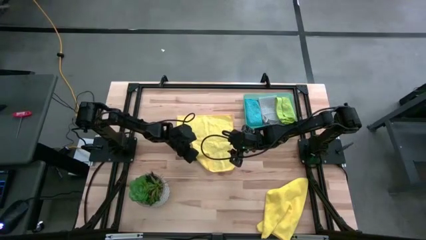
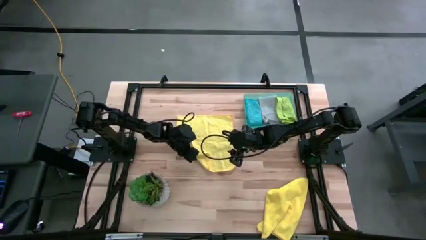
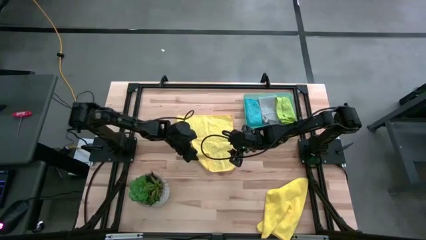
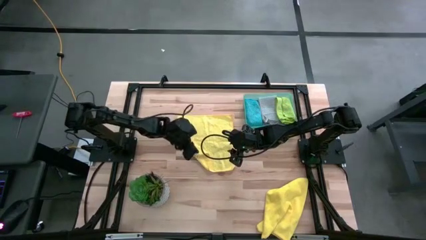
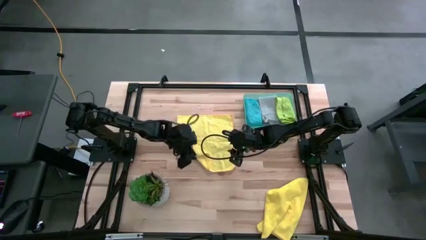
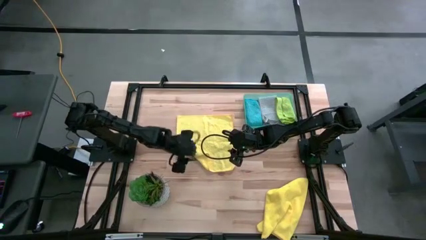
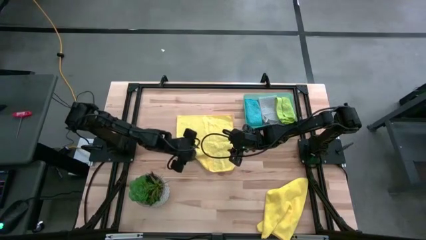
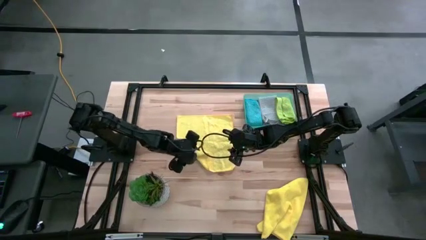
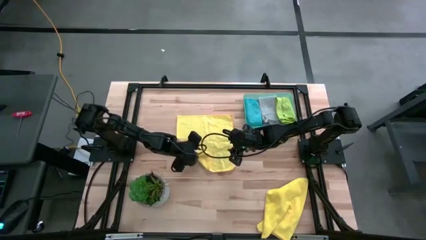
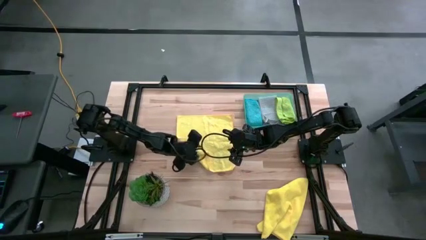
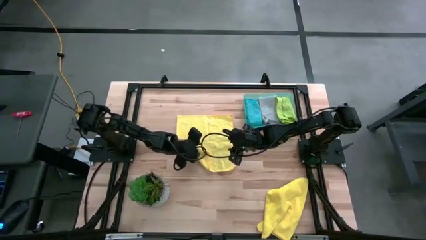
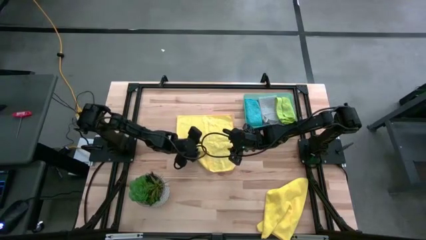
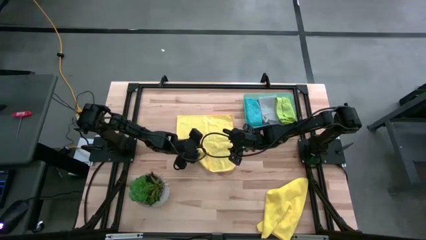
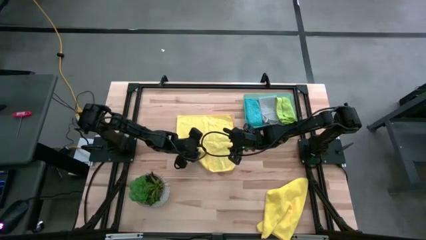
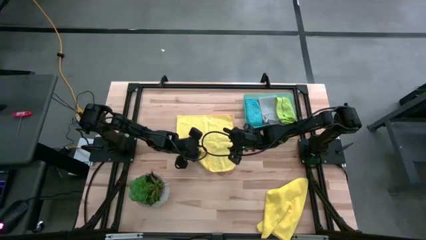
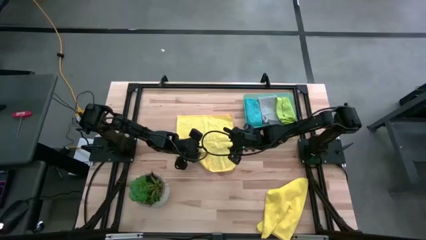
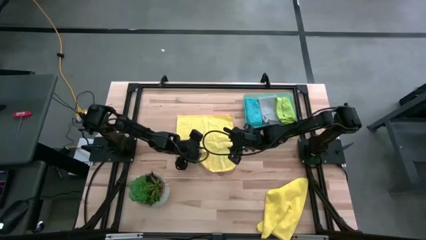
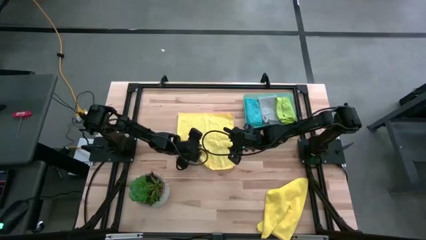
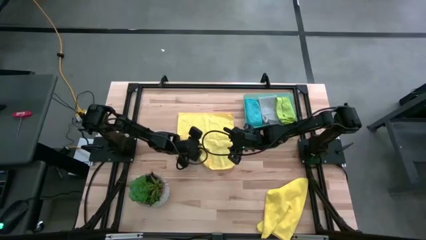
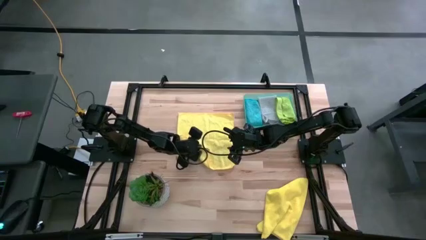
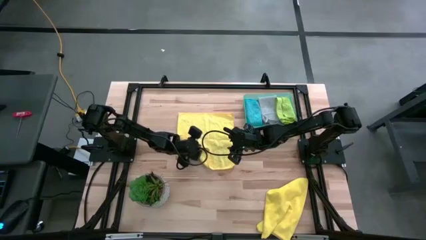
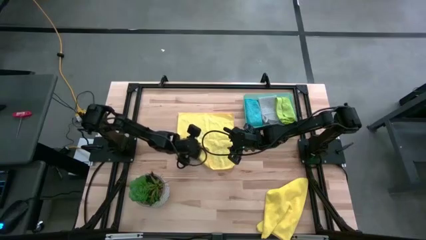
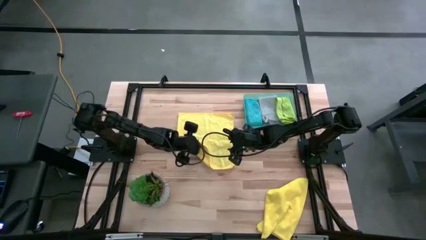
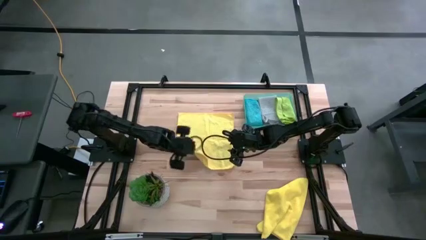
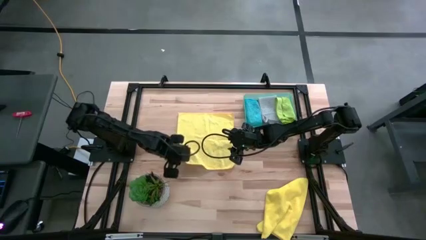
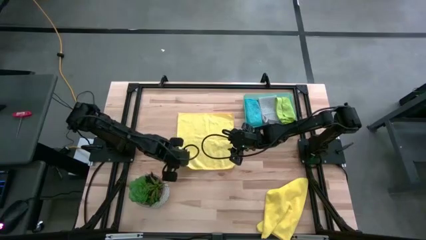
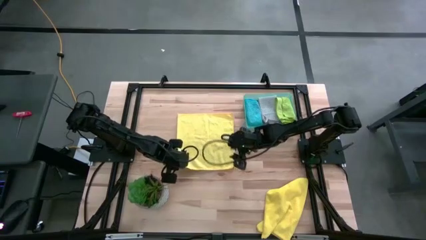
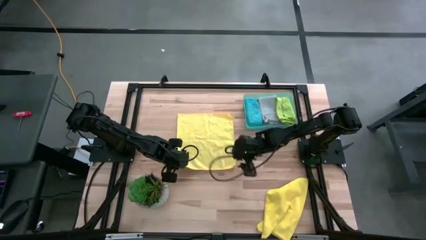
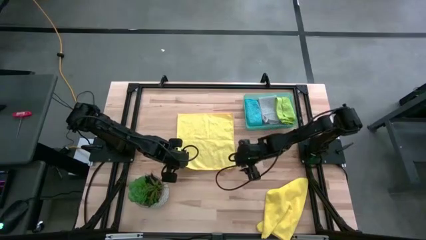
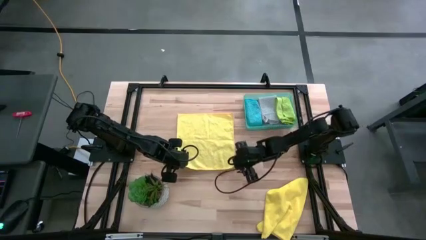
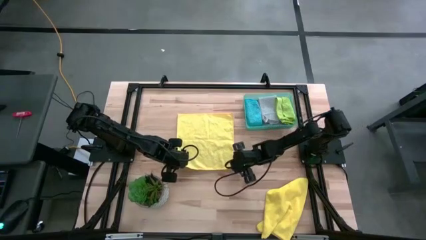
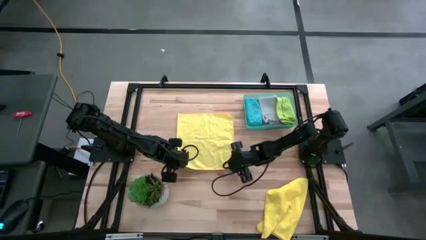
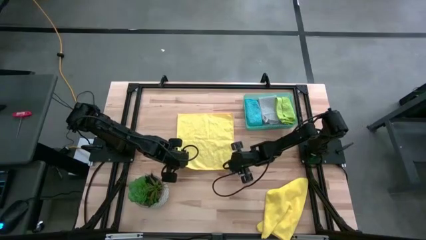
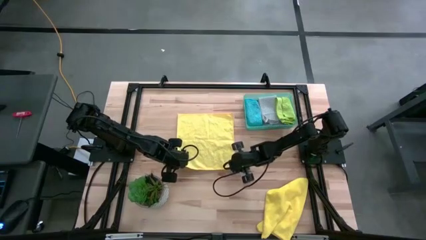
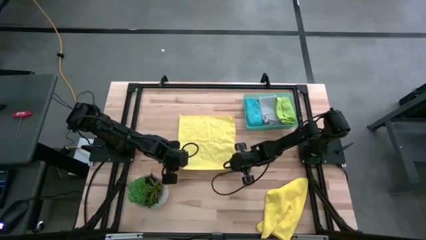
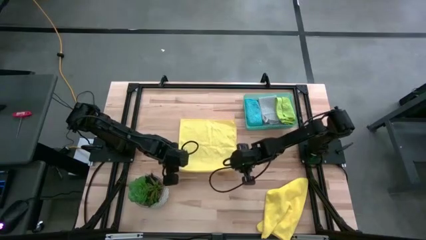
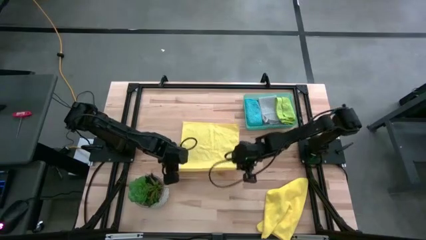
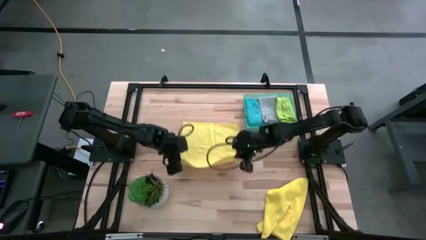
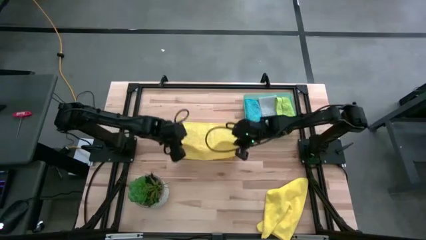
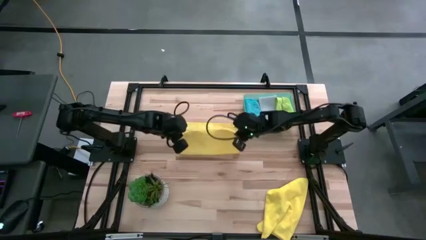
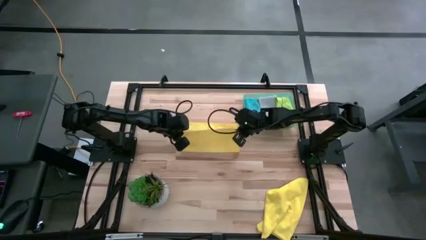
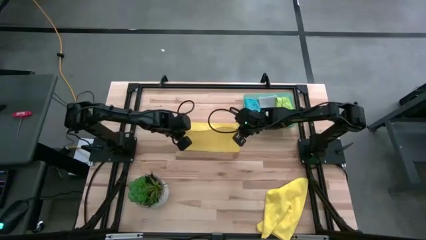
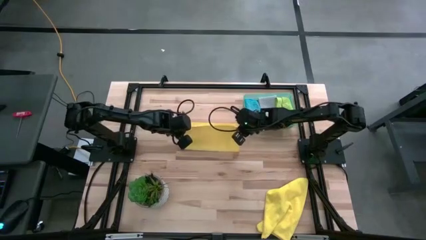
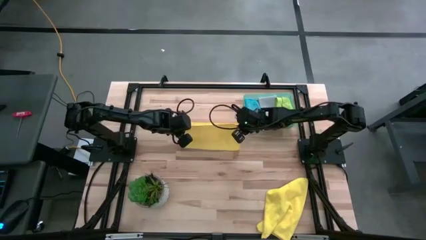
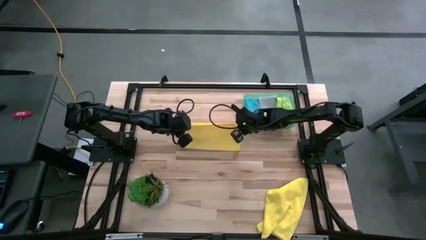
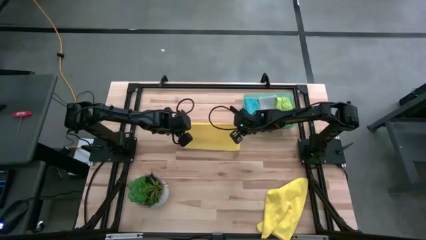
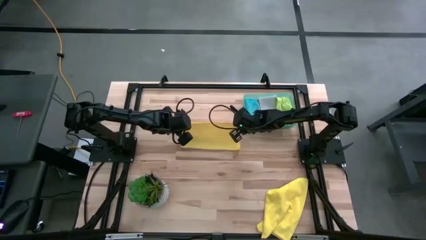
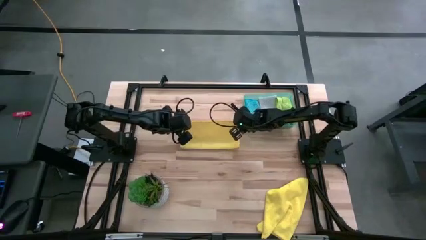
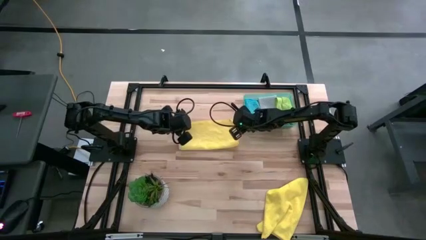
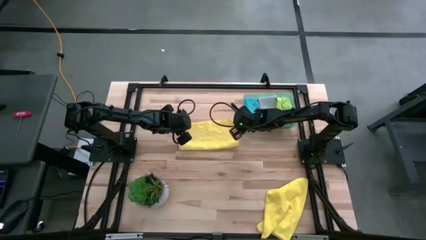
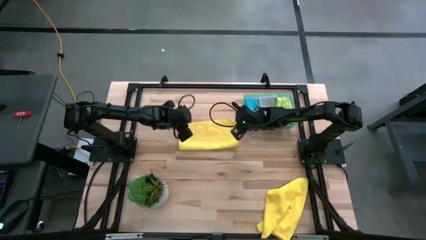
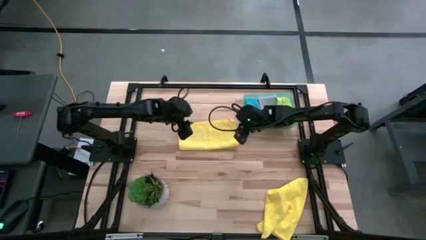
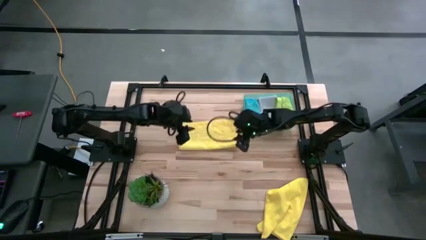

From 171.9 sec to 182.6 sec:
Task: Fold microfiber towels
Fold the left yellow towel

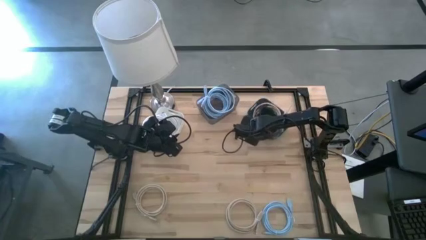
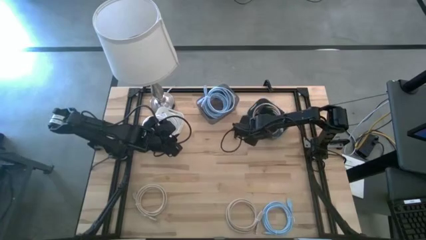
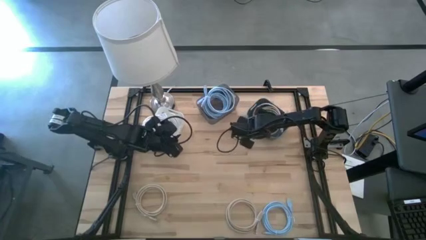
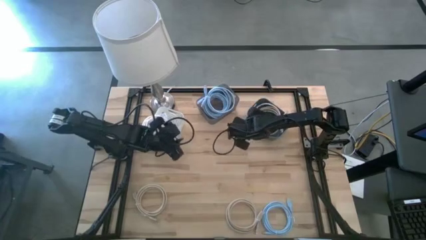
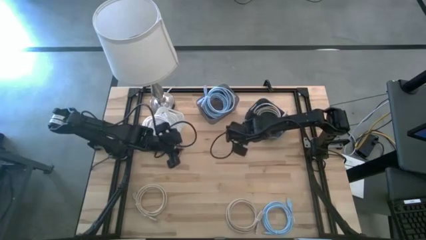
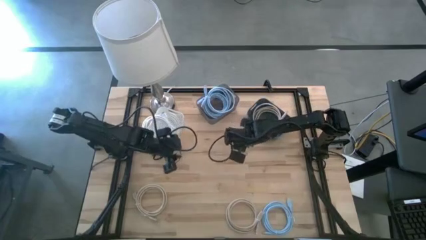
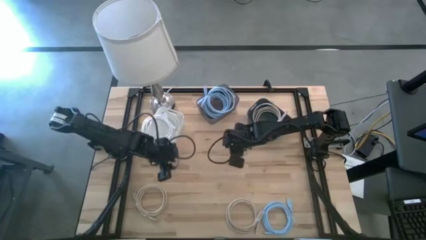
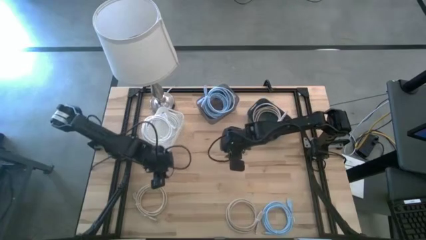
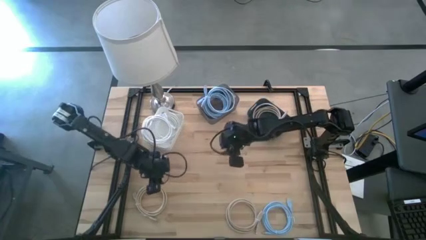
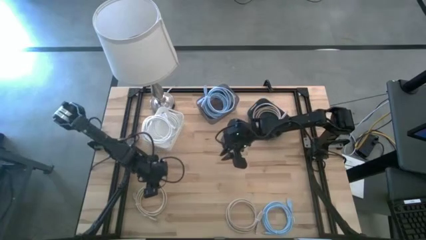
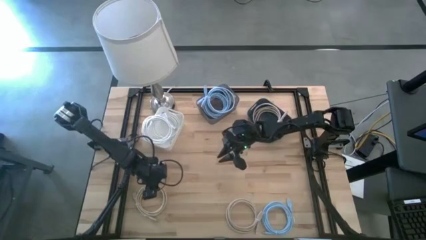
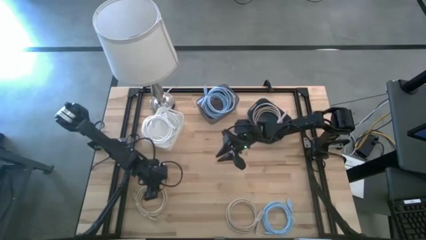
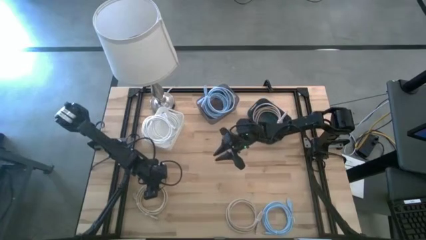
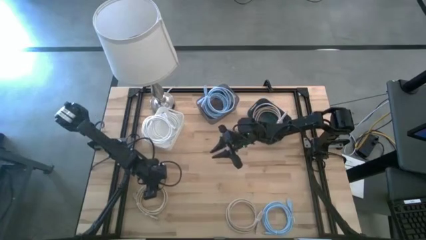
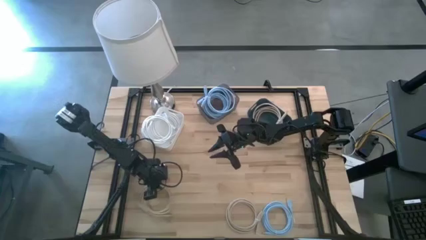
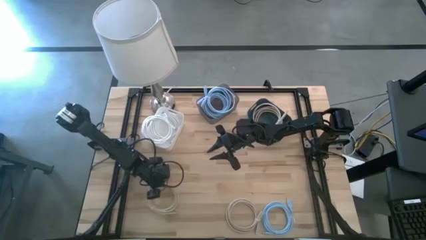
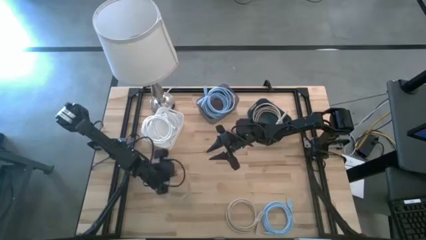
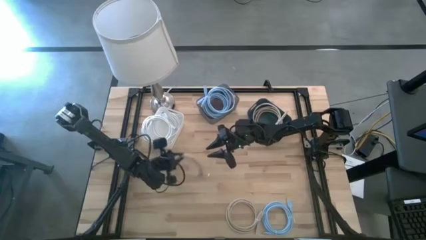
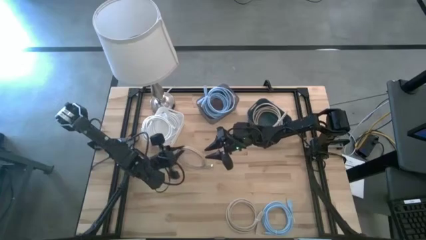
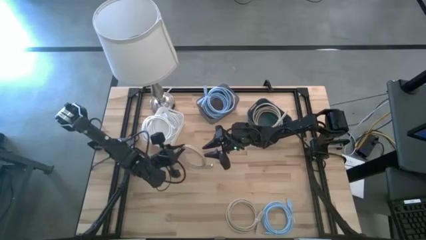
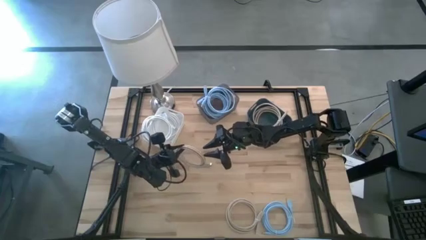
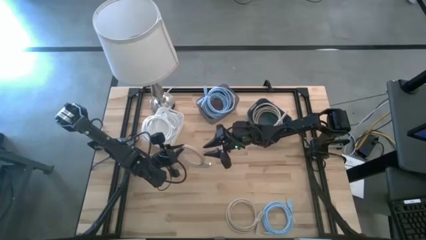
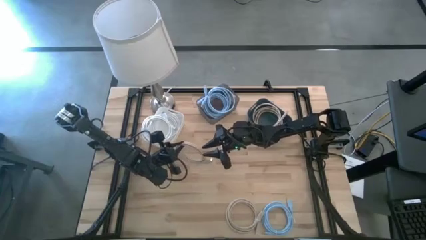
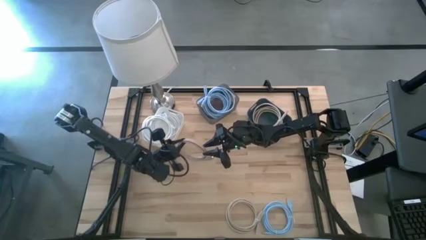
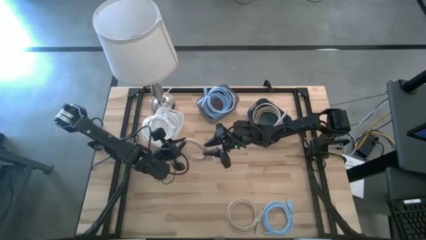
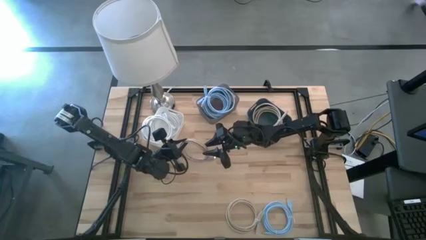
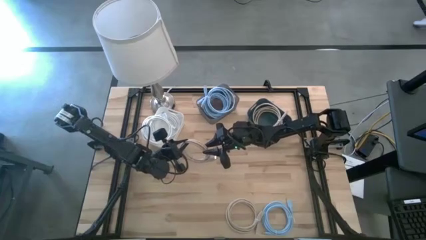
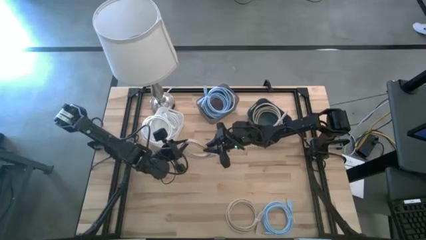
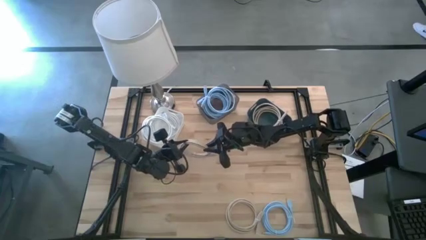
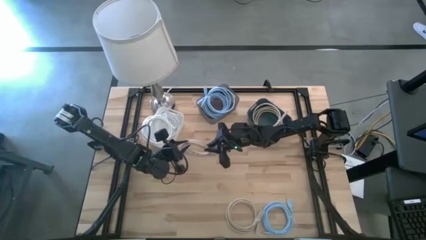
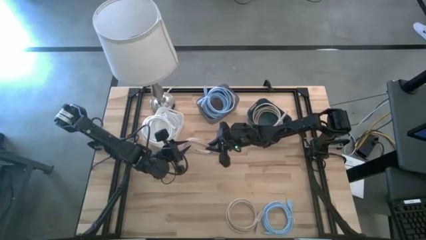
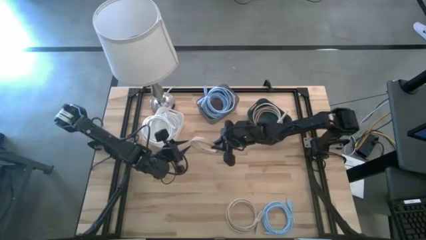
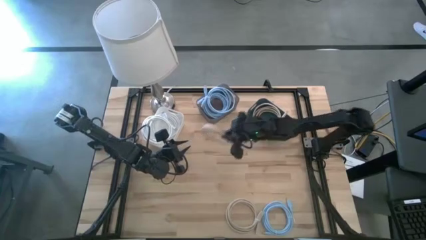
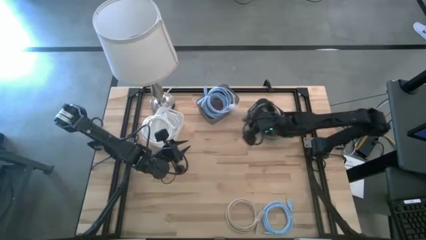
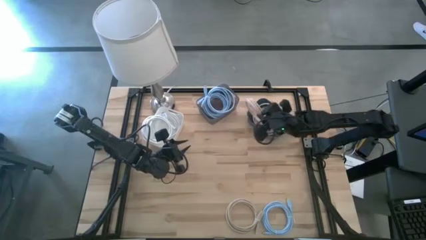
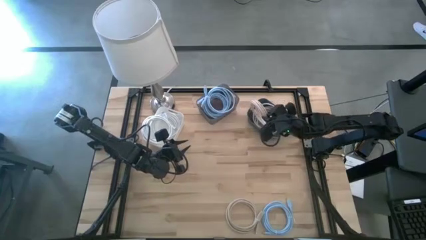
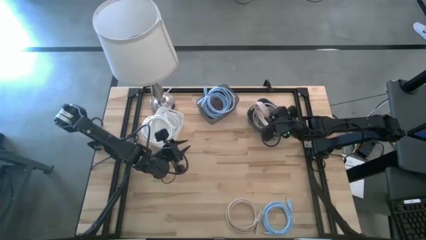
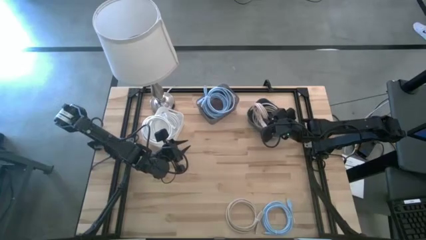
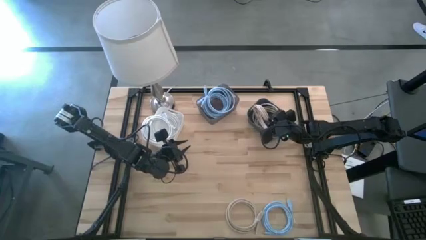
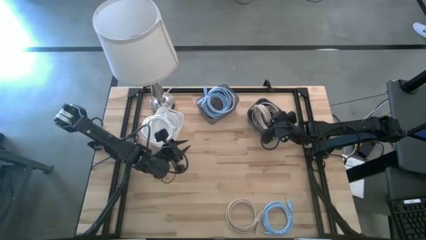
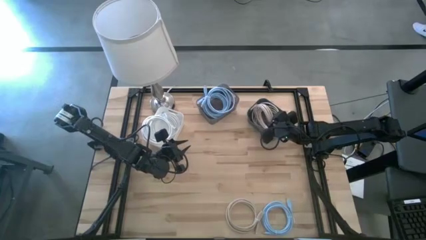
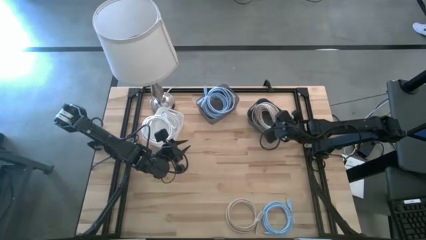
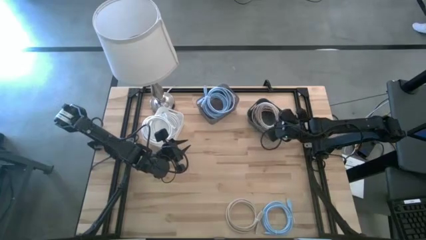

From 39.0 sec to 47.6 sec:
Task: Sort HDMI cables
Put the left light brown HDMI cable into the green bin
